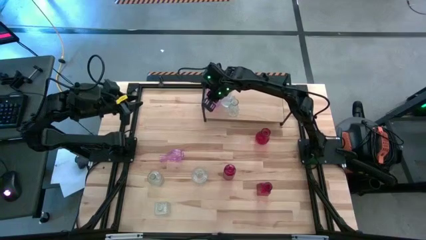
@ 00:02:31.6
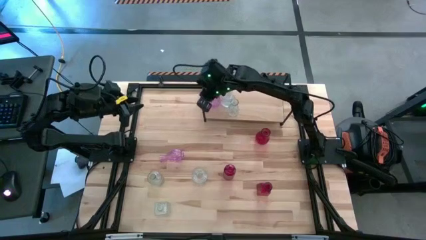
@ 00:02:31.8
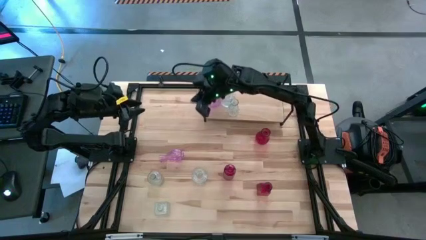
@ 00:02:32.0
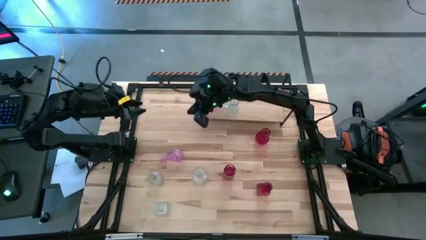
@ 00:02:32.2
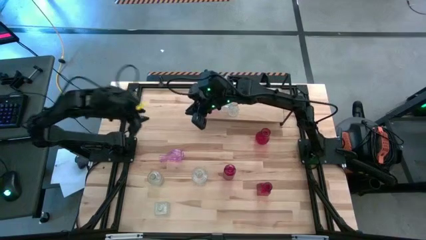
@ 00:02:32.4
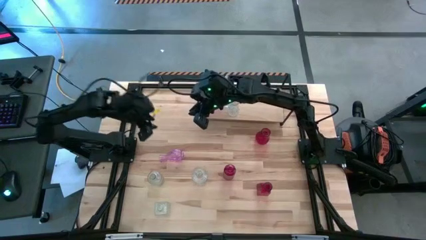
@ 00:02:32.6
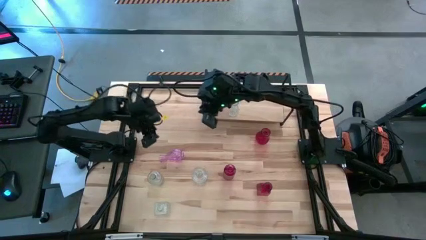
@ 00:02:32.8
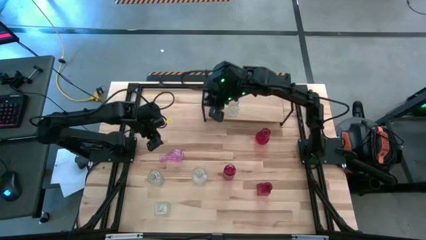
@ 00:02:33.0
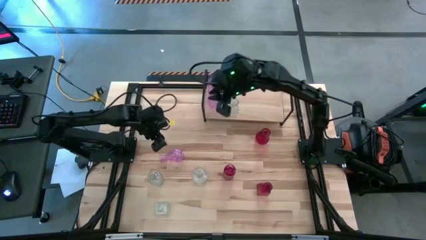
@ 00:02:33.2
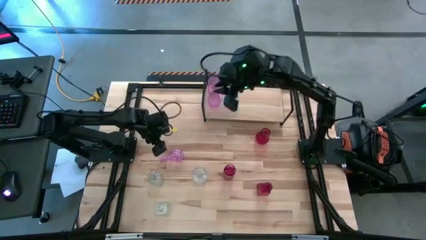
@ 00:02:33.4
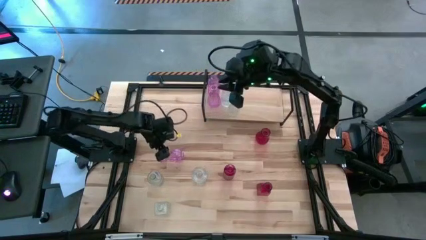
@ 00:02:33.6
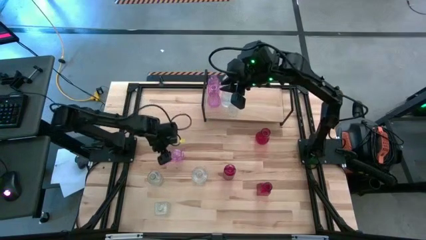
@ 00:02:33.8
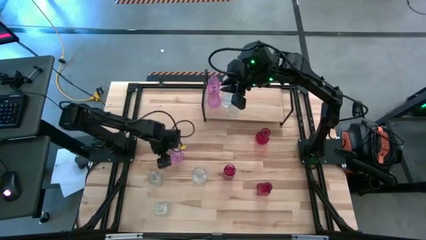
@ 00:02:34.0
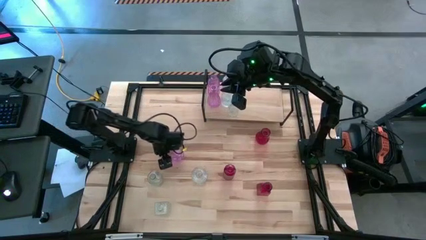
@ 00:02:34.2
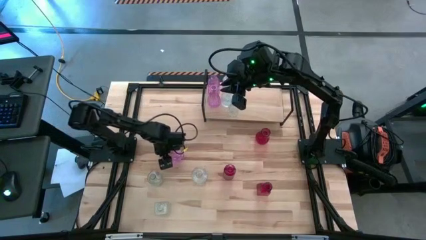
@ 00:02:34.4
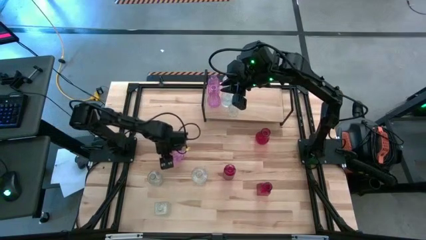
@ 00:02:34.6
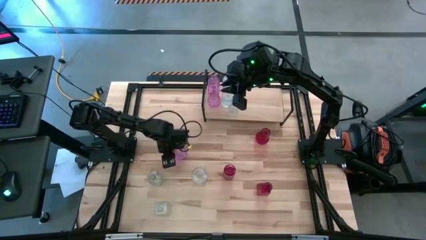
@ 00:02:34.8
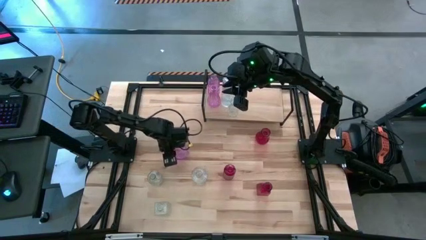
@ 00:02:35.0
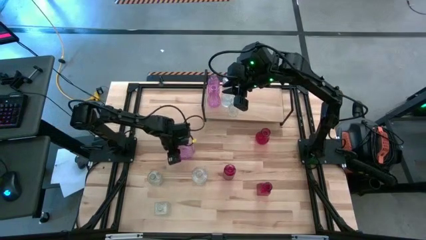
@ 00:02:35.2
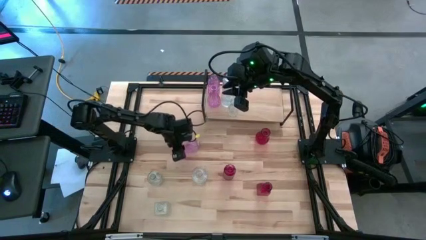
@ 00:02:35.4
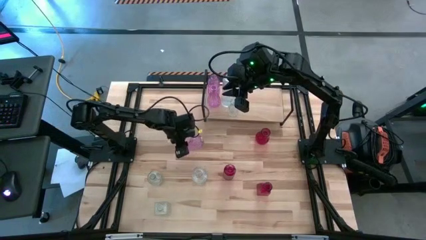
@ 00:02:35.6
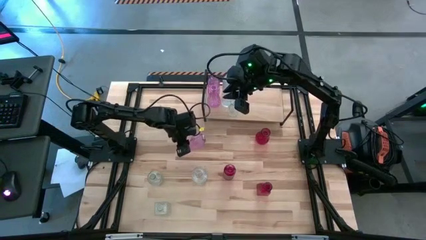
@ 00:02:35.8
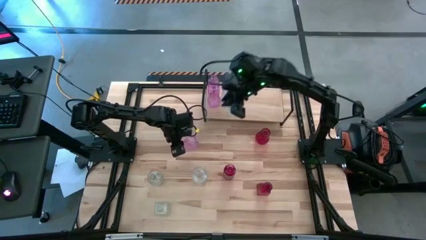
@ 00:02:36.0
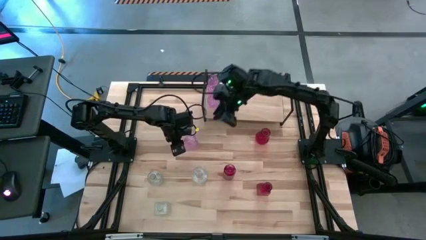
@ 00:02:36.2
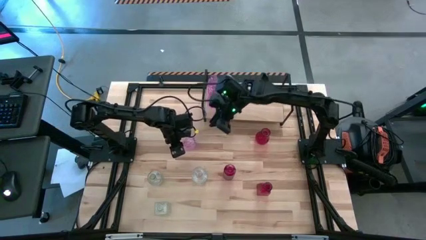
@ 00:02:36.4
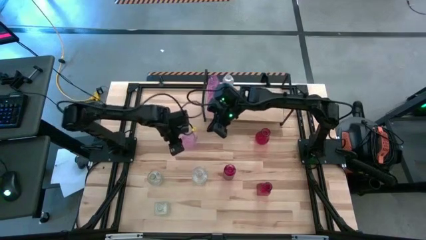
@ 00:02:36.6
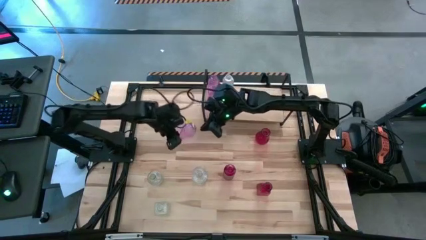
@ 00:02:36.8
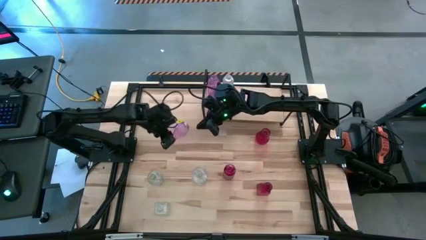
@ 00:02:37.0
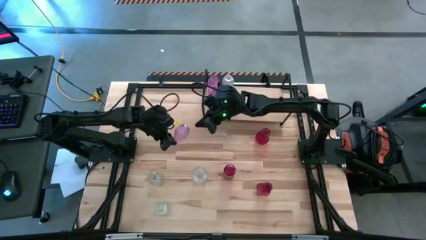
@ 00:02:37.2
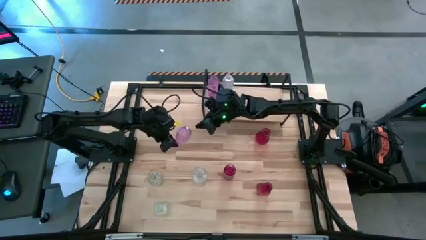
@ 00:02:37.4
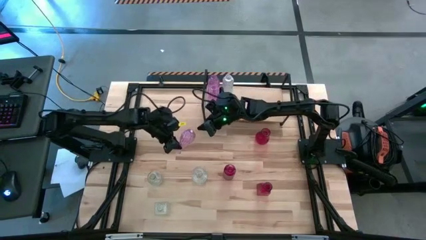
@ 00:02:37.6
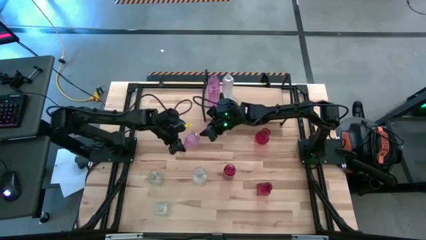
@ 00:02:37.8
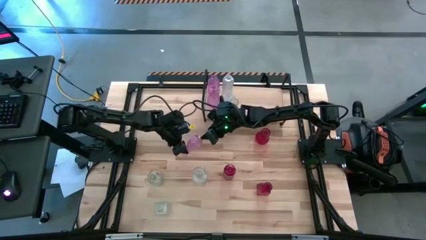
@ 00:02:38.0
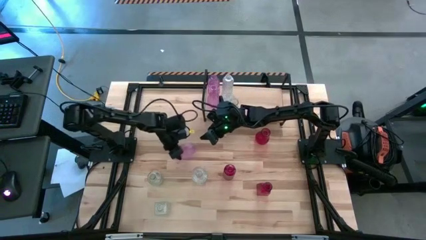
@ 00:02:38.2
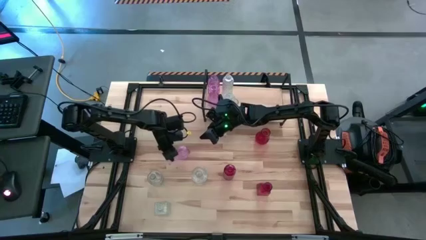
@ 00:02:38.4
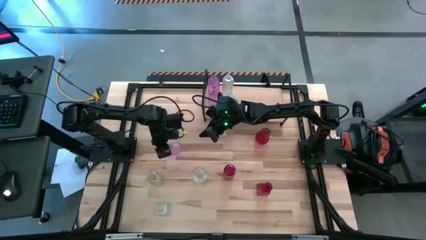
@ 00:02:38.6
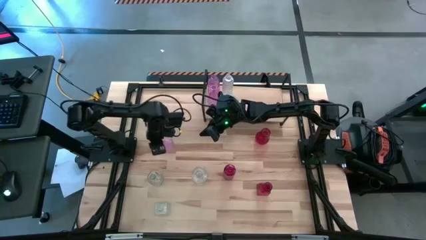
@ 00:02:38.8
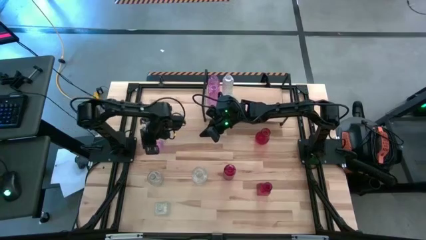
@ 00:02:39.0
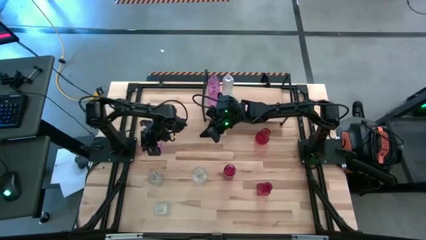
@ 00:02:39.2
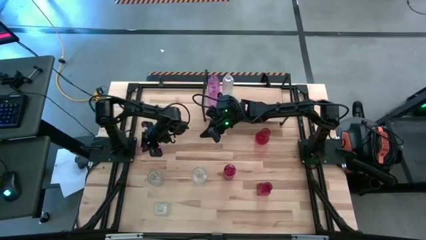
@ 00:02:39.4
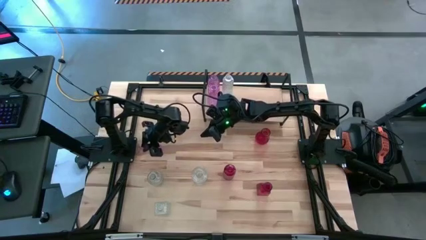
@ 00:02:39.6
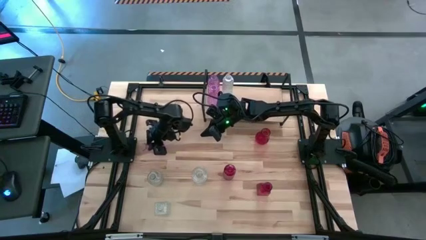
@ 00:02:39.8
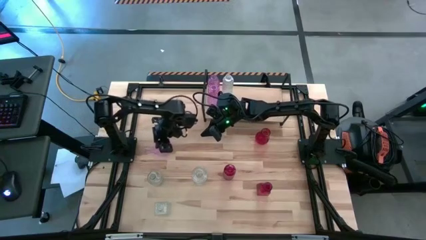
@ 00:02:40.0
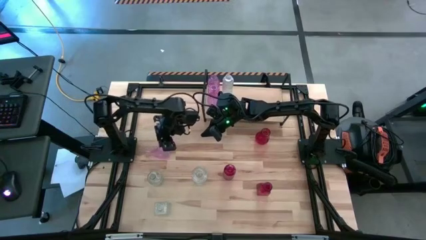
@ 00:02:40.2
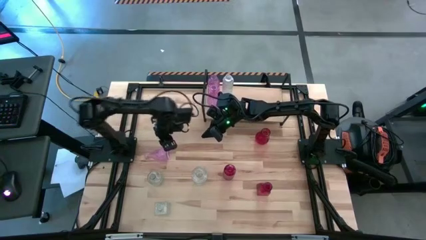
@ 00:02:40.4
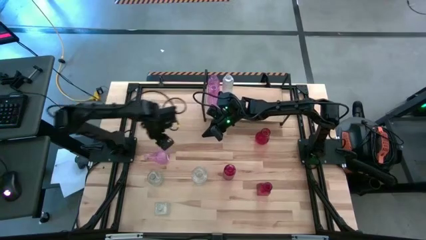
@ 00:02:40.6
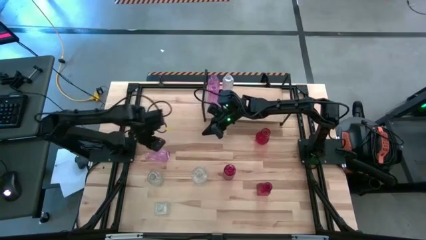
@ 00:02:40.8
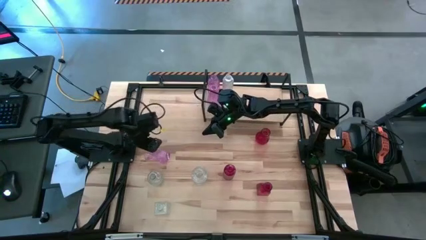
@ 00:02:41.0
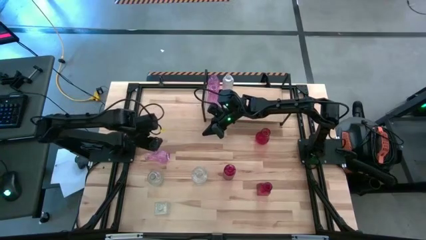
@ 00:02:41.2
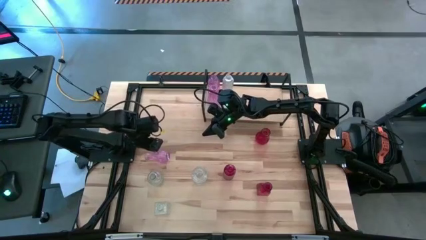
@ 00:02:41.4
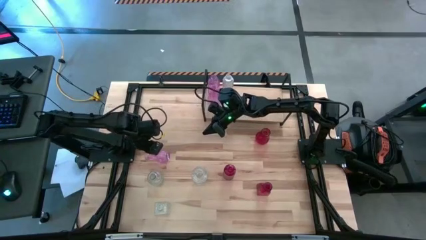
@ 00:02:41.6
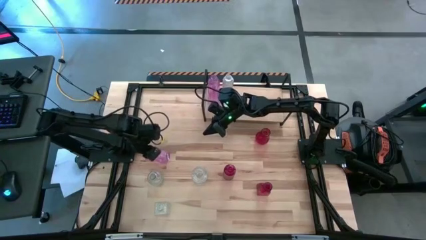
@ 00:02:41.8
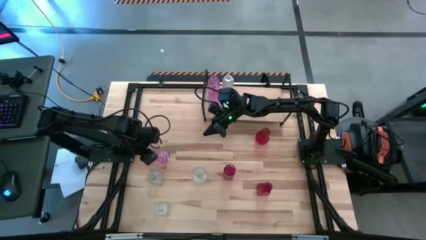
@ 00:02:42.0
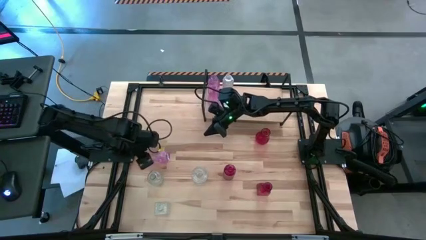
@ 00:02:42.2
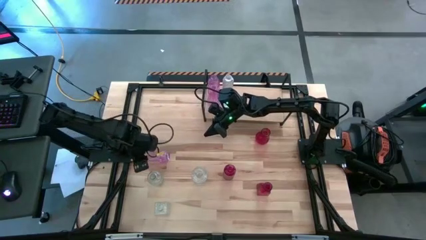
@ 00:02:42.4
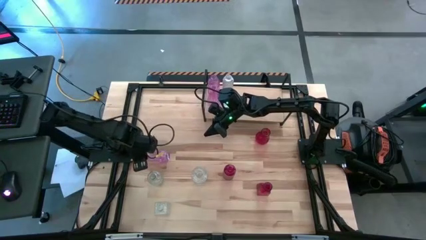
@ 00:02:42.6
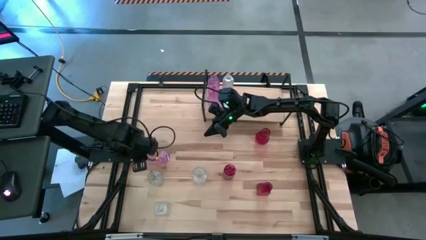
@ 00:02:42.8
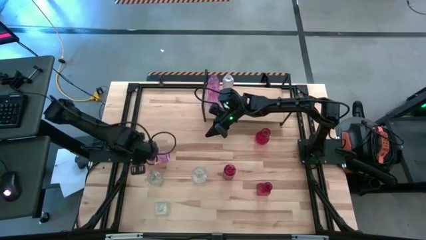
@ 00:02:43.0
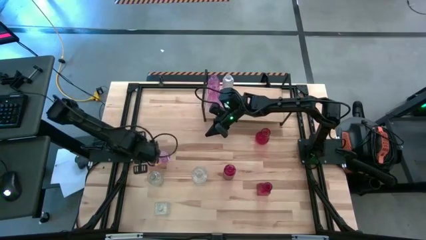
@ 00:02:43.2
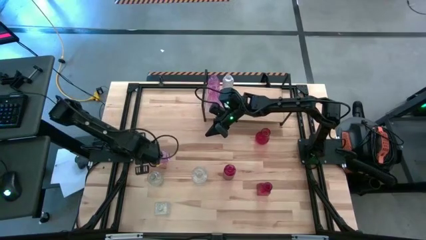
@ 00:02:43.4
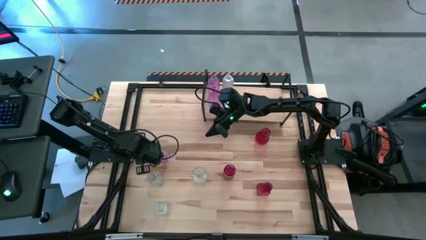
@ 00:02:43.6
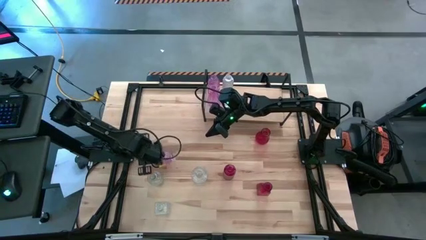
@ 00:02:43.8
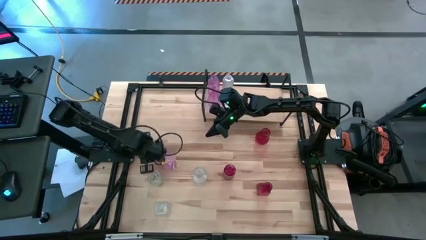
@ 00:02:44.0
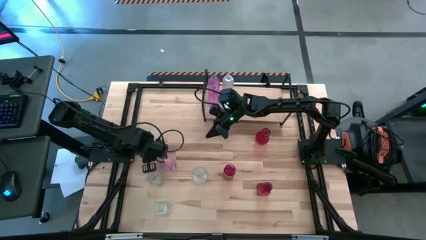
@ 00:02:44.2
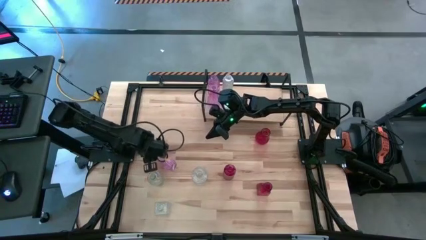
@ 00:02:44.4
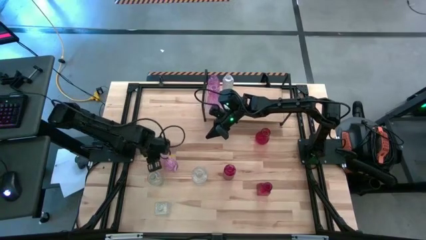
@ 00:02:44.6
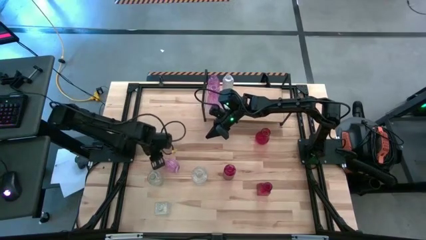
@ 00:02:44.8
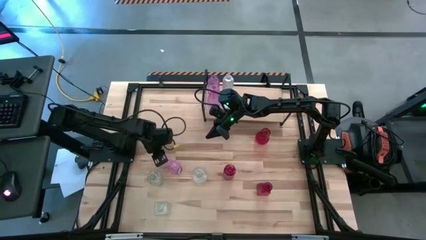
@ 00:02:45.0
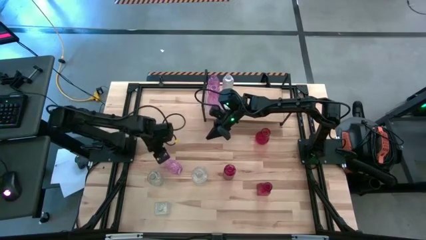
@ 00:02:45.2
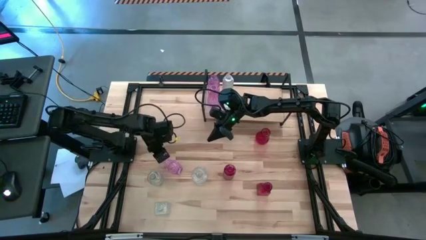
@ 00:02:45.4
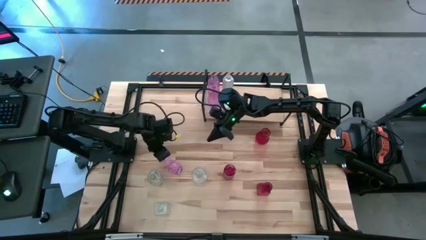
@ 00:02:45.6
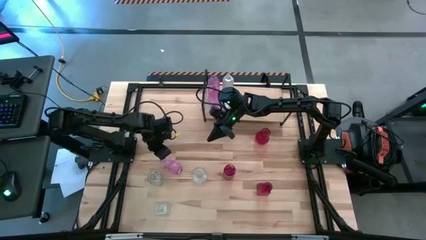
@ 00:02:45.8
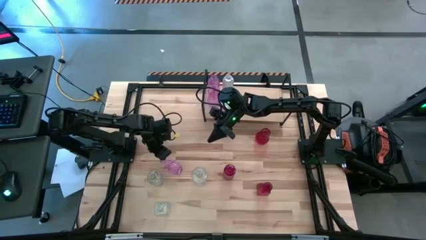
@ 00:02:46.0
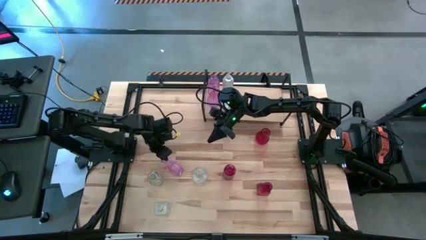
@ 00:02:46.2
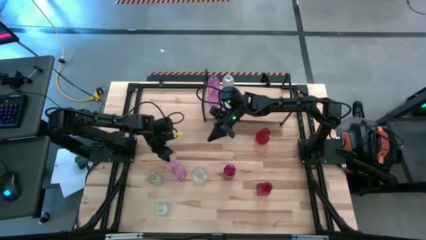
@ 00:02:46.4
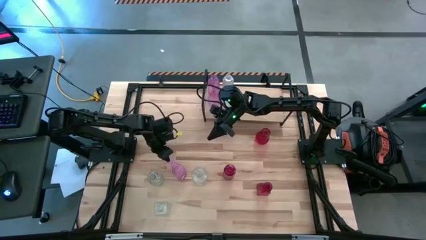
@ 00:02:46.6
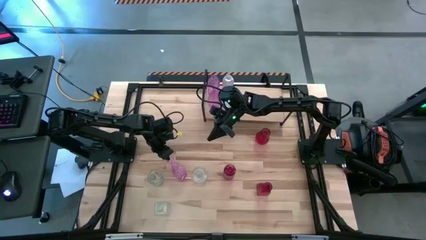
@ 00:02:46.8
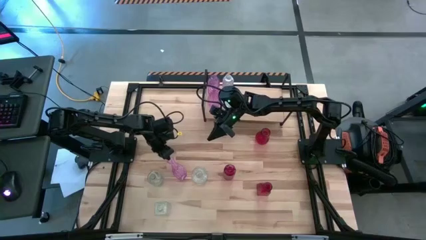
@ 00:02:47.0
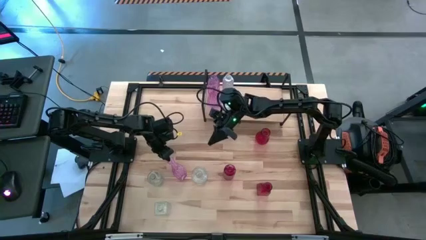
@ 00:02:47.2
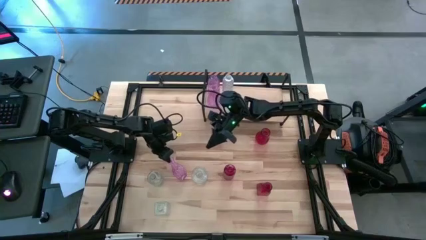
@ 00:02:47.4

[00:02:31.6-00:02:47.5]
Task: sort vases onto shelf
Align the violet vase with the other violet vase on the shelf
